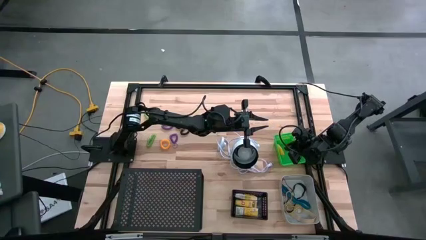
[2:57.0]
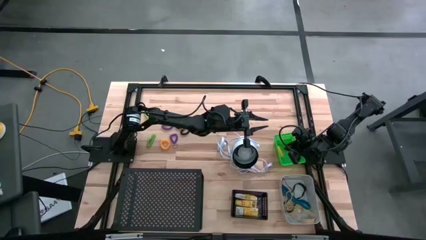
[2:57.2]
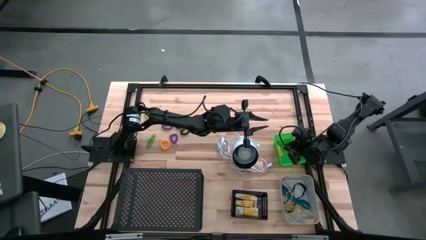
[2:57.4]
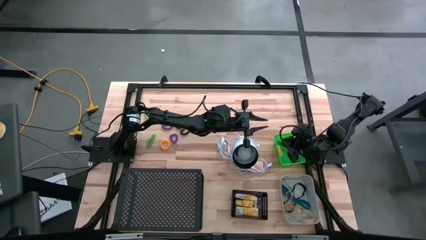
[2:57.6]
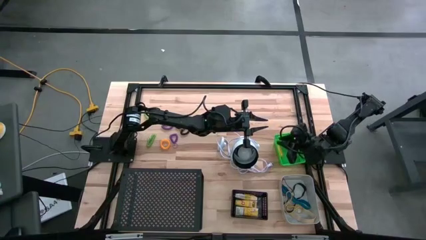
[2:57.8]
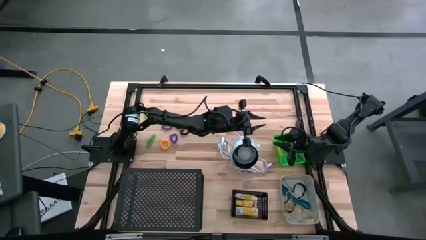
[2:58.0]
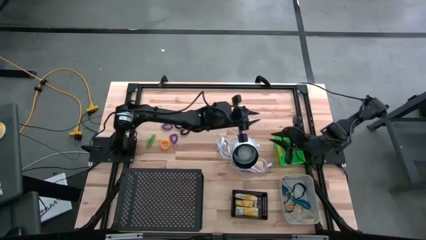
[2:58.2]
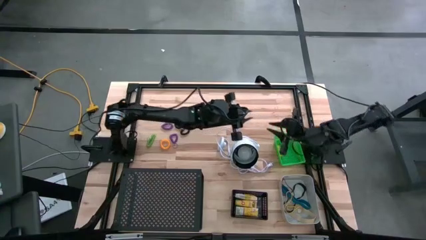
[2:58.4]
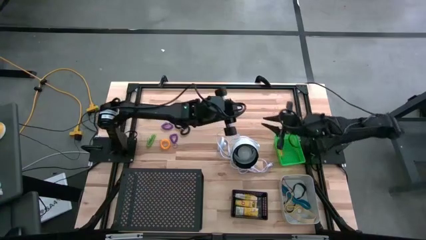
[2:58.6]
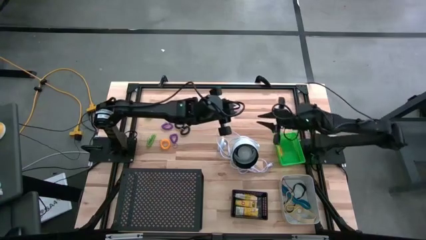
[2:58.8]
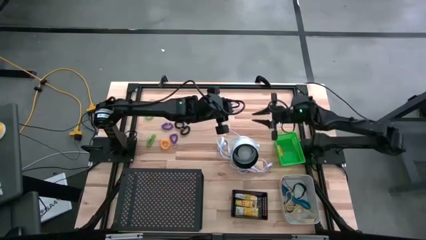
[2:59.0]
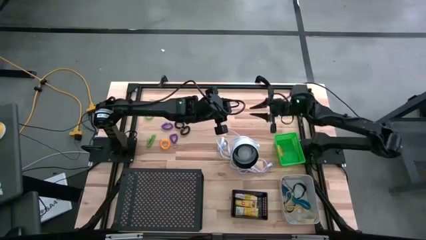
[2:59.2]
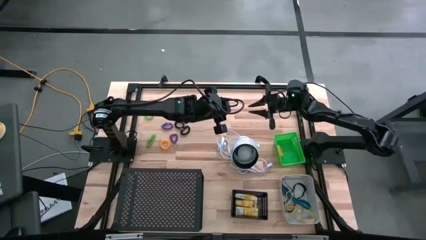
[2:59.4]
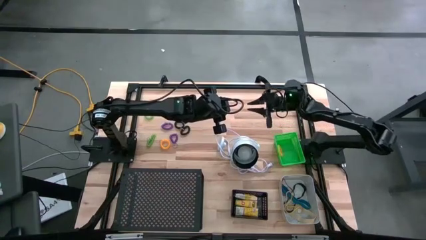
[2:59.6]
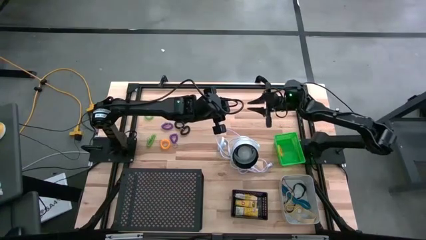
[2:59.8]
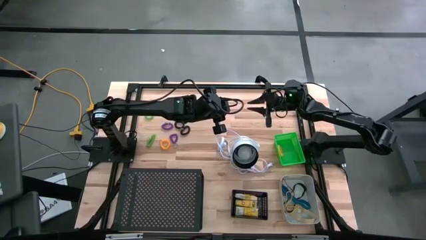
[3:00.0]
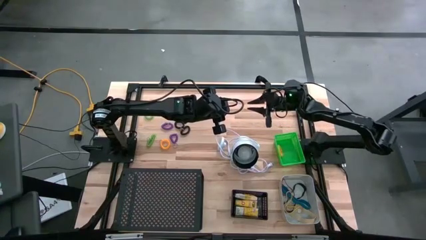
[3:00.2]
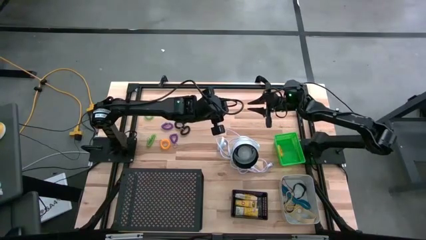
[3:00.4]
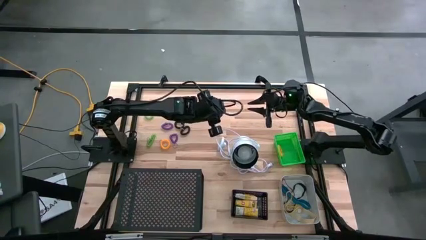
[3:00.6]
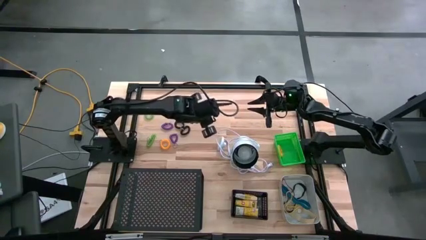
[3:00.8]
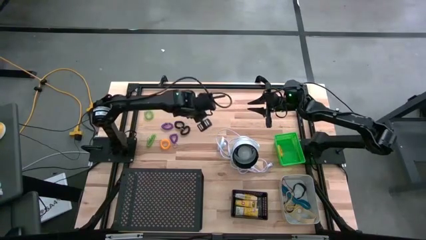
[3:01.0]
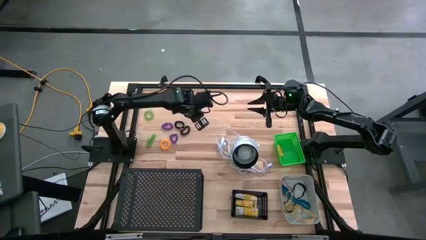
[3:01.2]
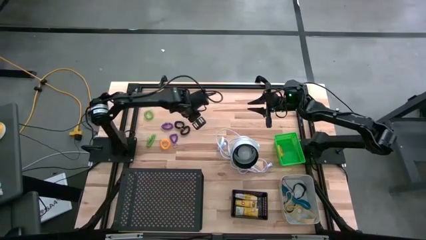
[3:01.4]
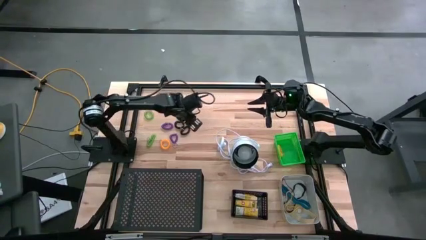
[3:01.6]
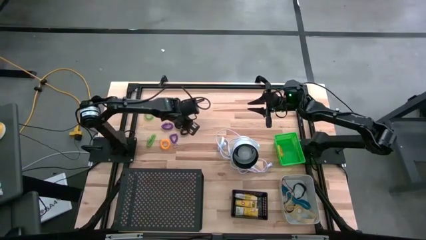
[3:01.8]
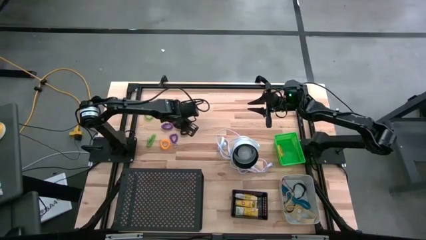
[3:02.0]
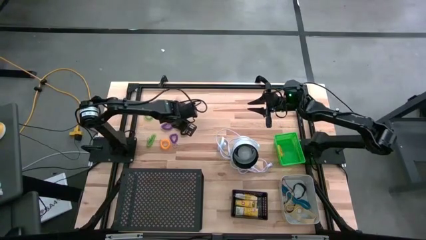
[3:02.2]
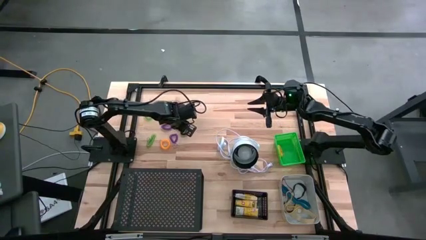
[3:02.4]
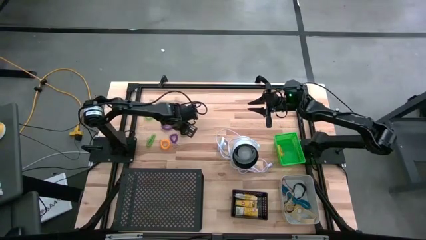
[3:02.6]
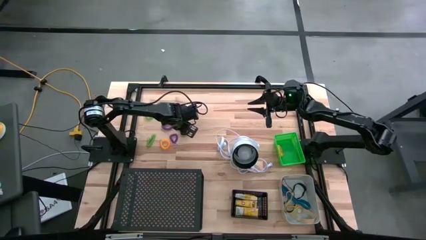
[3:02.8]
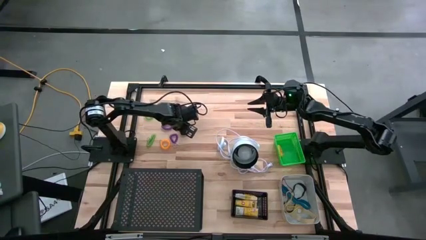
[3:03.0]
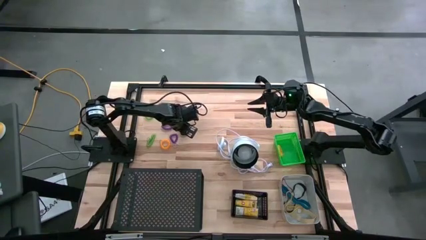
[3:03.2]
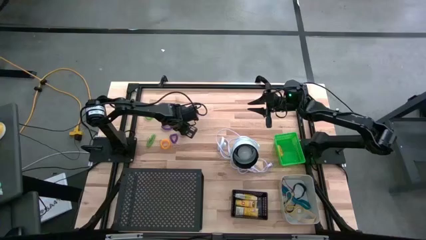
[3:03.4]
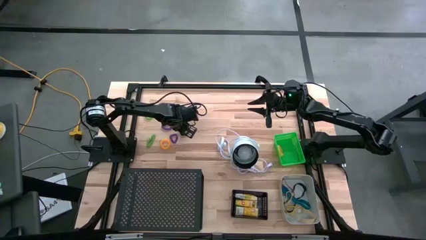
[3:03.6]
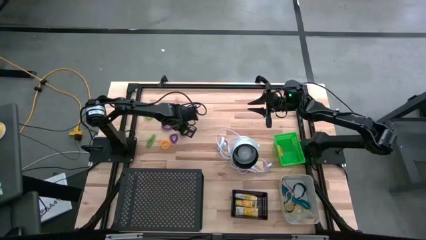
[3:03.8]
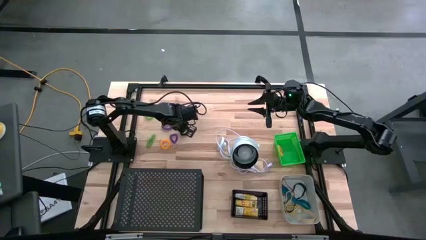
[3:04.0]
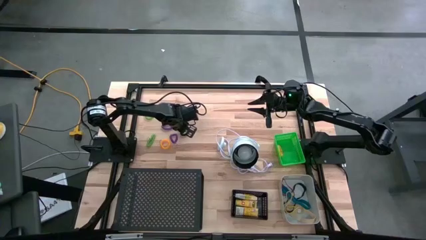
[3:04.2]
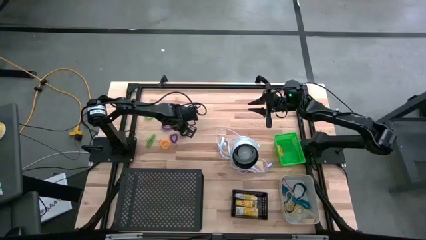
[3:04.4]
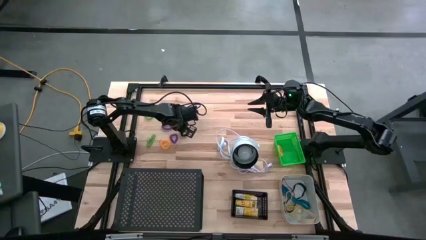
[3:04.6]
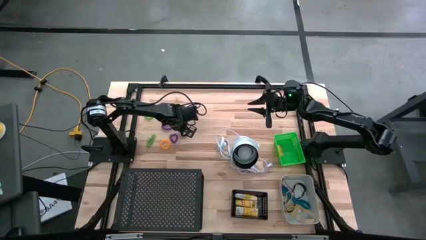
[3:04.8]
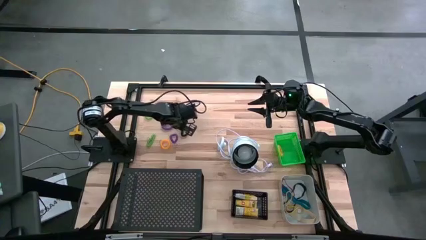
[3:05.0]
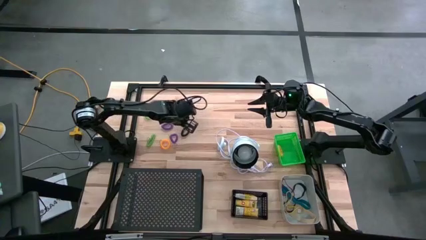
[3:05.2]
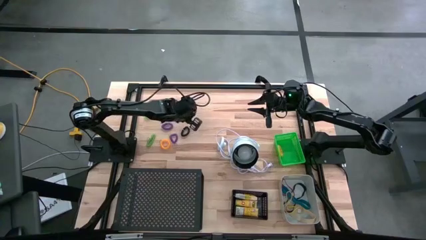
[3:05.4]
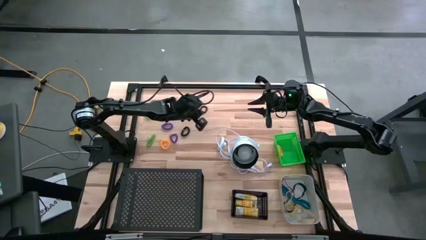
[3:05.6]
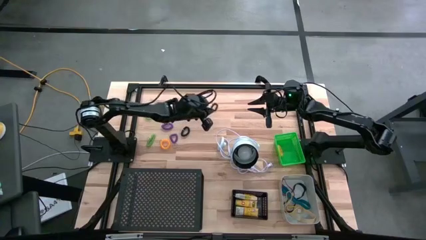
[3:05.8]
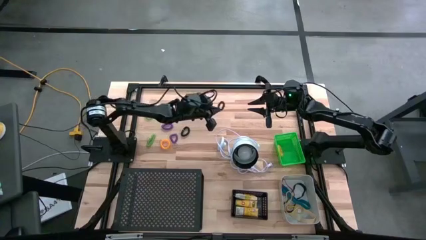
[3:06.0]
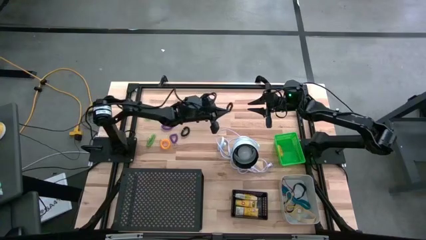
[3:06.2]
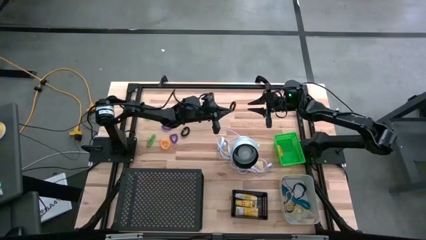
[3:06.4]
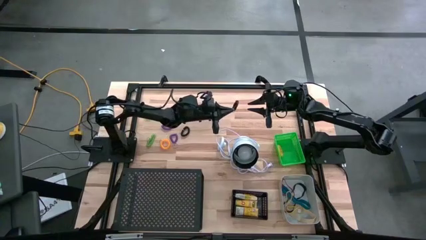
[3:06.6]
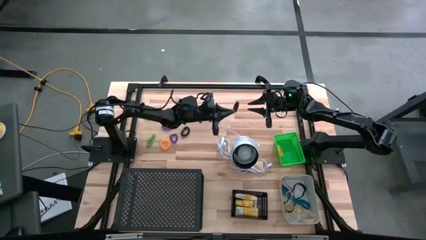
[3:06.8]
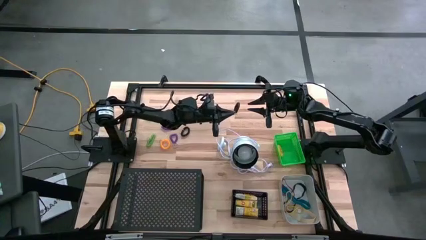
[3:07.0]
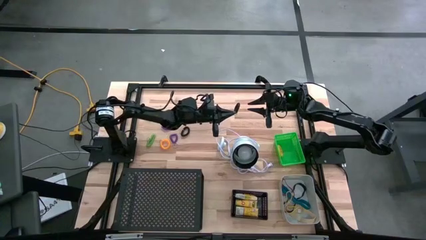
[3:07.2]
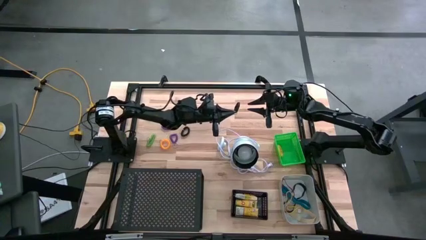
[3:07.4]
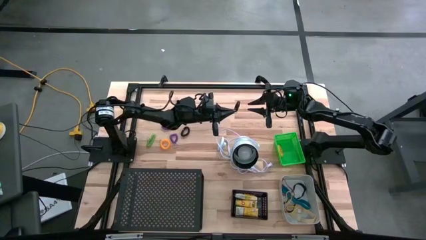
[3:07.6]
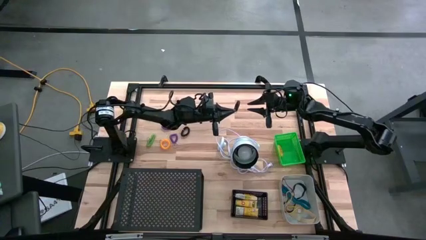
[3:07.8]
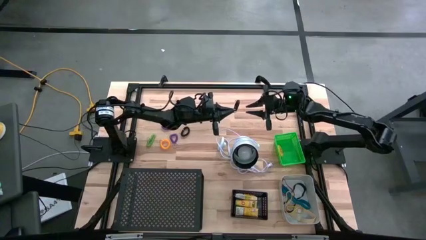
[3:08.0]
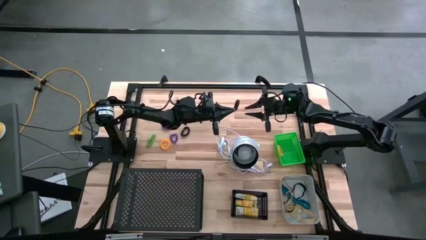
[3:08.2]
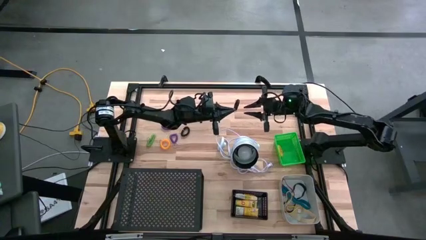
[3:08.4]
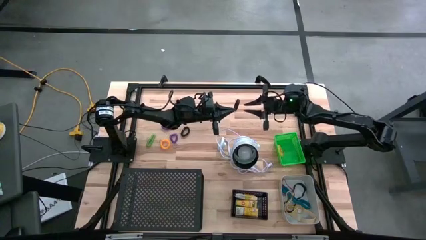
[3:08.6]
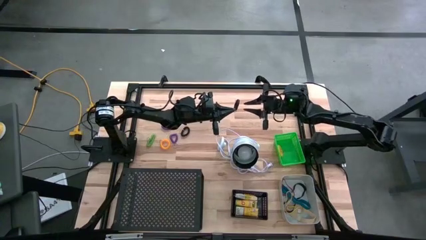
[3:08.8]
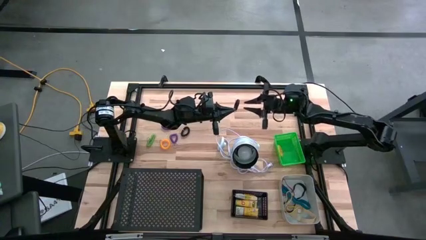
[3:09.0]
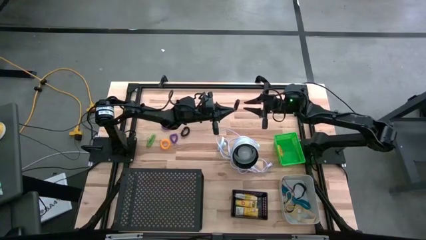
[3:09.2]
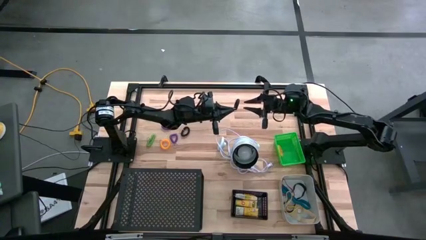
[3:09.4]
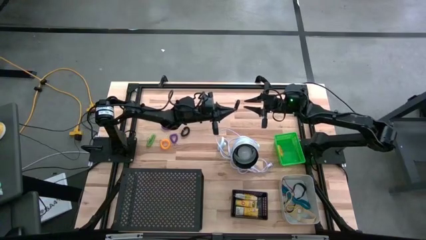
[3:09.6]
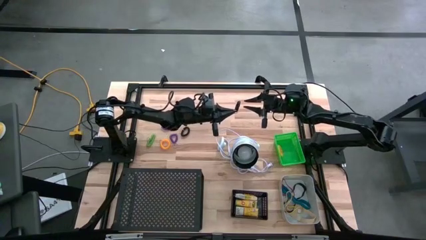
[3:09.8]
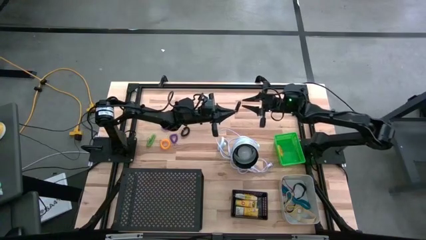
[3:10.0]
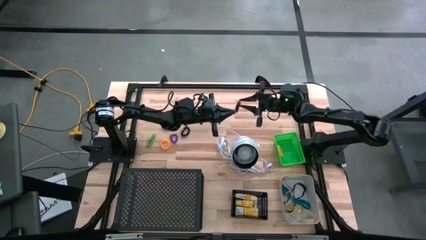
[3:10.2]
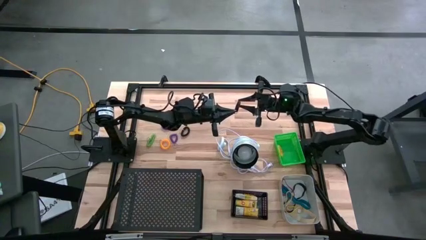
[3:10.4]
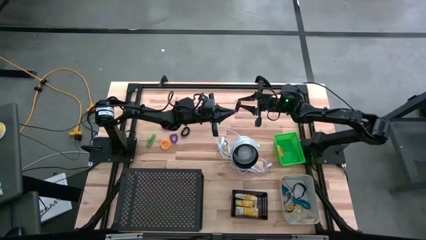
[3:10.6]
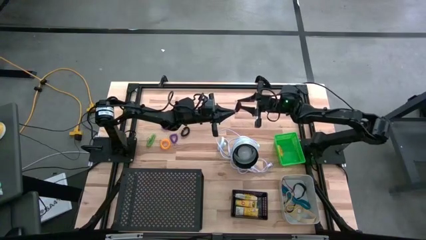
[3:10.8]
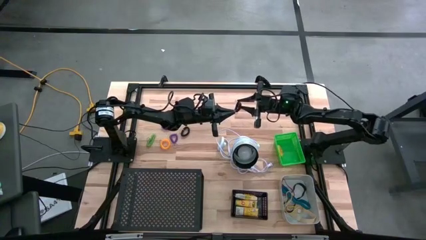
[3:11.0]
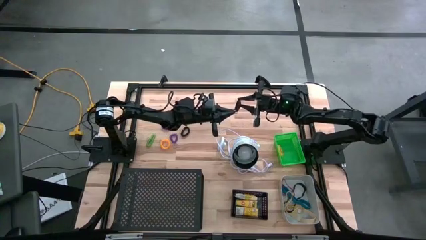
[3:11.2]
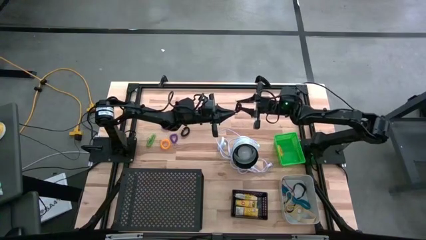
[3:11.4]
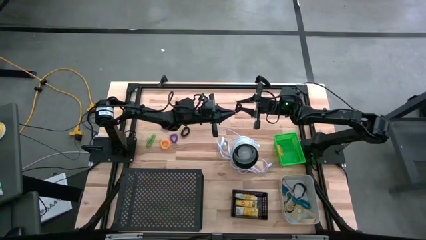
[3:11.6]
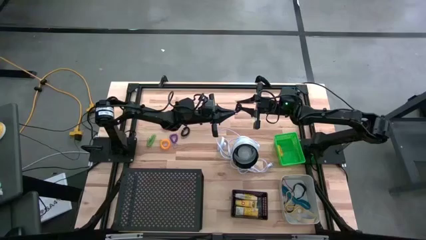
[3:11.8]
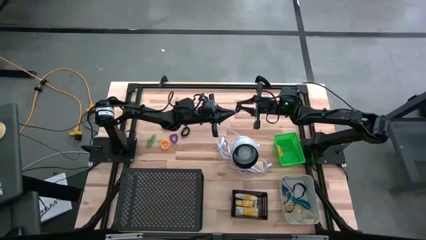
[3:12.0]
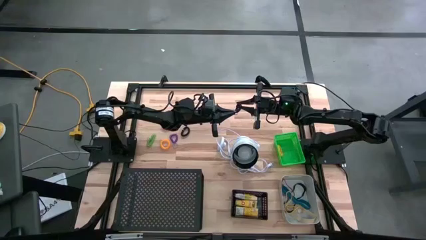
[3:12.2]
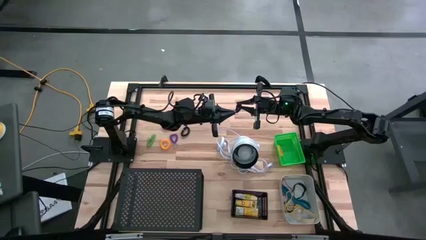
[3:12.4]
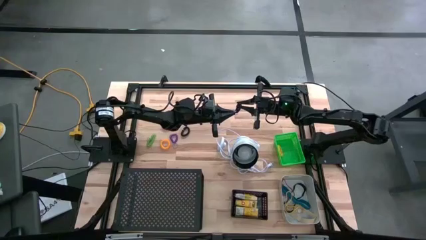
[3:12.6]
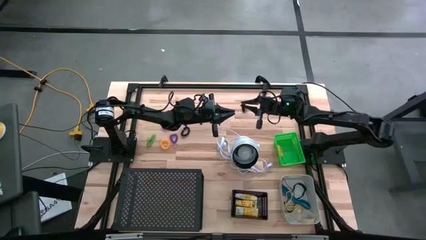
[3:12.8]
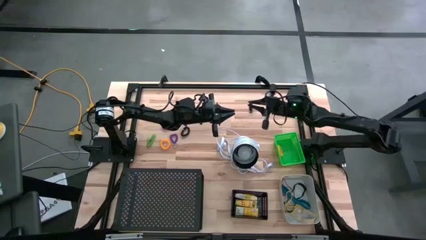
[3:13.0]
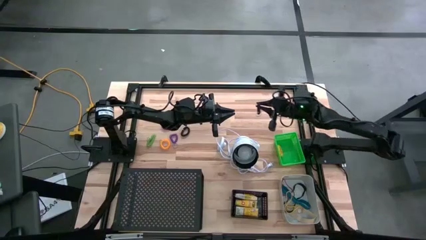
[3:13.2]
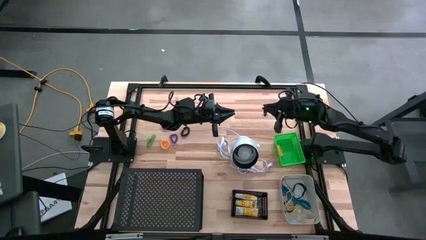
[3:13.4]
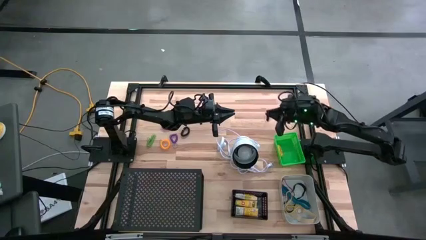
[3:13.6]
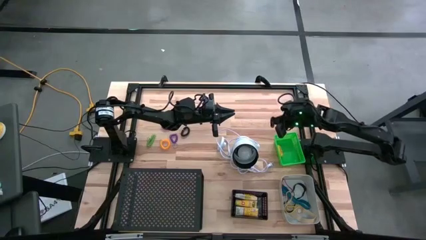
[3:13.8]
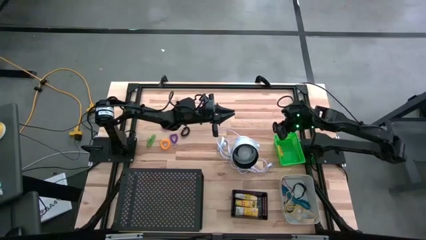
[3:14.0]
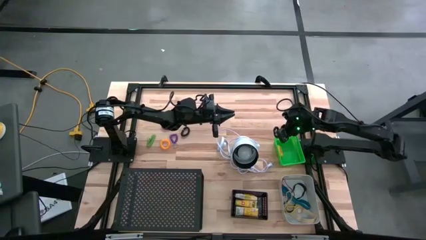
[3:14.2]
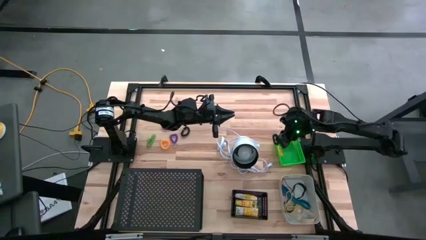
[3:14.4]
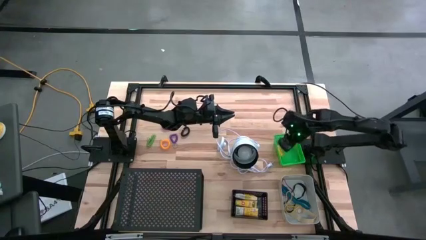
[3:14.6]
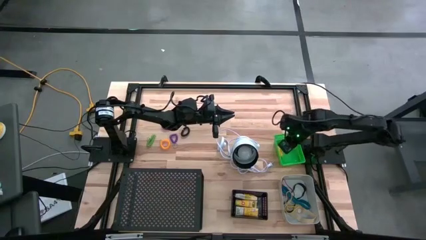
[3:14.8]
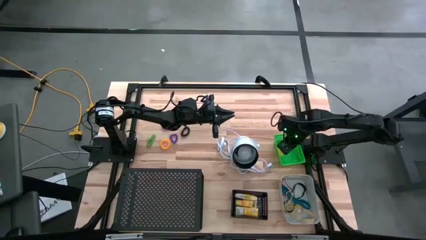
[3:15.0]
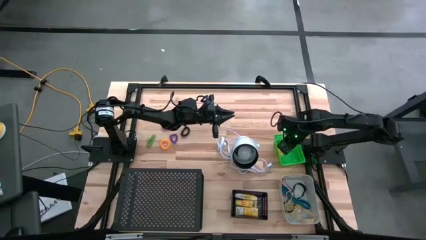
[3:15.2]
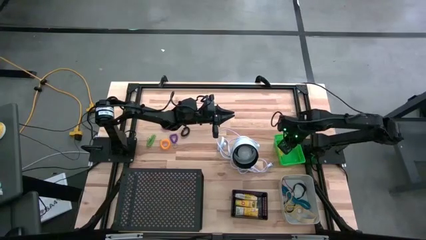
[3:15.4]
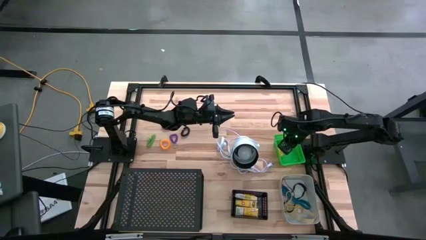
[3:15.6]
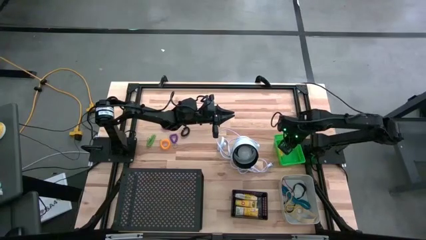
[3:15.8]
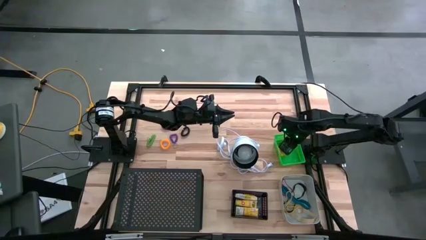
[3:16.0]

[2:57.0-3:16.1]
Task: Pick & Place Office Desk Supplies
Put the left black spring keychain into the green bin
